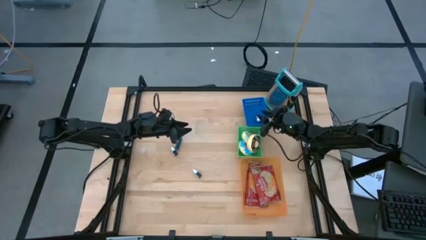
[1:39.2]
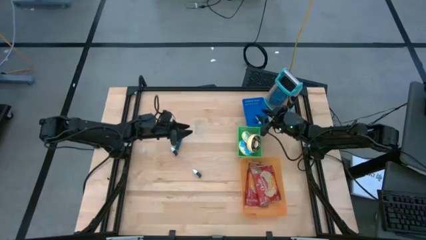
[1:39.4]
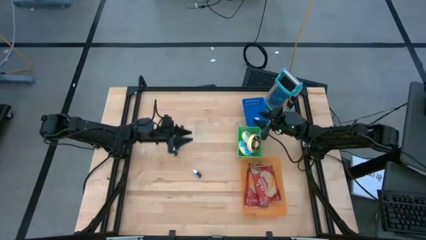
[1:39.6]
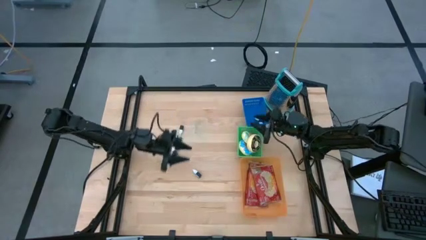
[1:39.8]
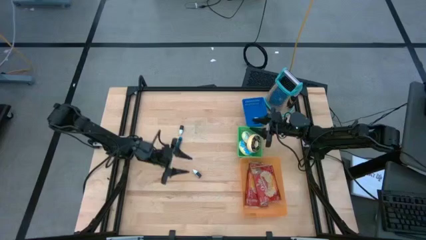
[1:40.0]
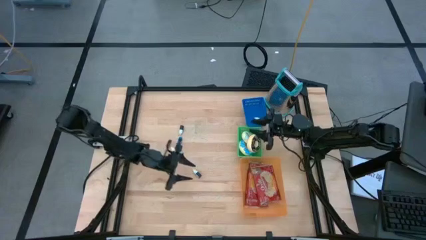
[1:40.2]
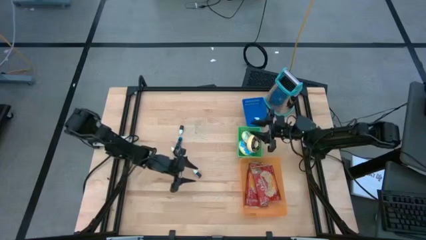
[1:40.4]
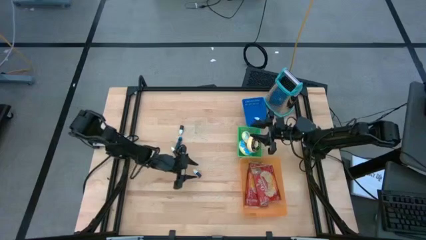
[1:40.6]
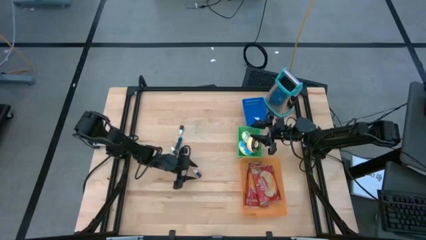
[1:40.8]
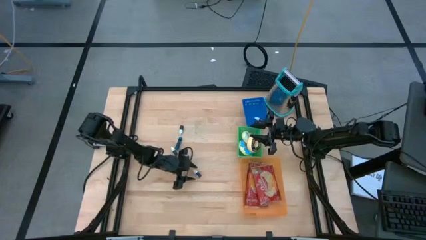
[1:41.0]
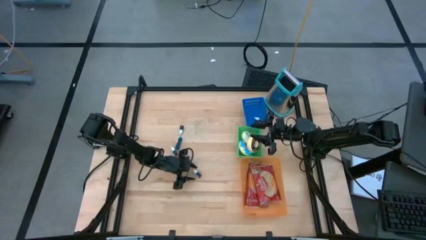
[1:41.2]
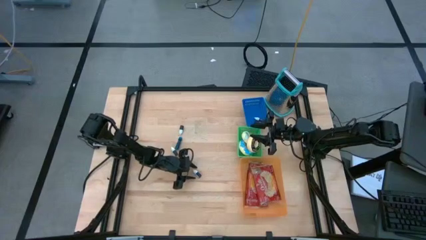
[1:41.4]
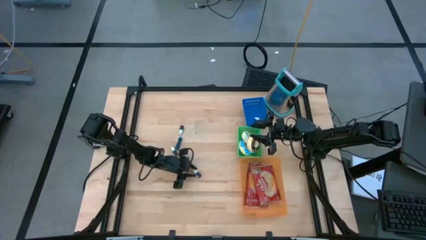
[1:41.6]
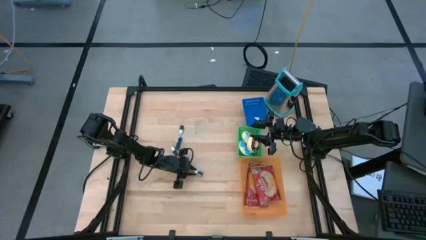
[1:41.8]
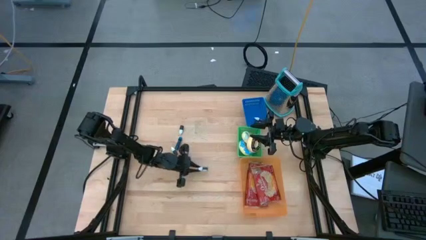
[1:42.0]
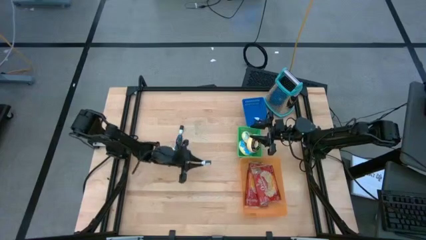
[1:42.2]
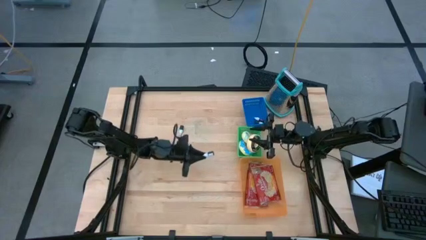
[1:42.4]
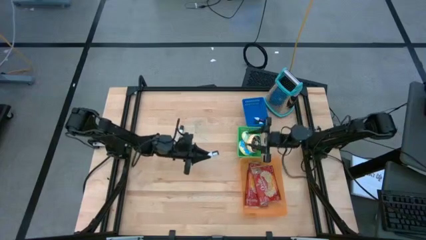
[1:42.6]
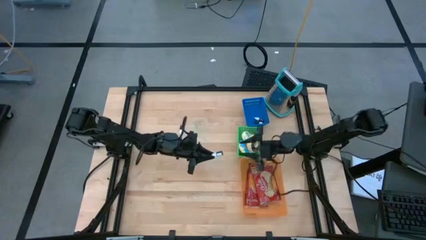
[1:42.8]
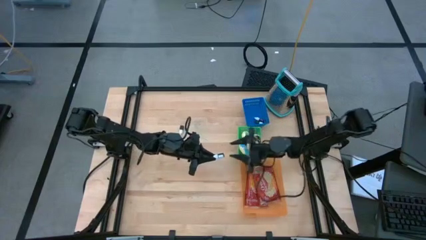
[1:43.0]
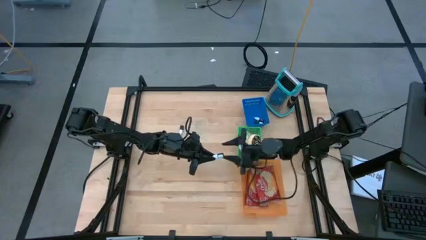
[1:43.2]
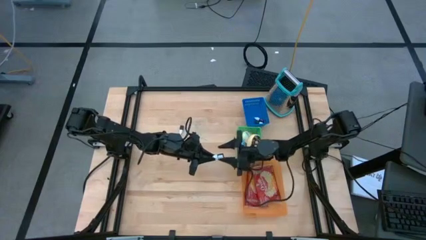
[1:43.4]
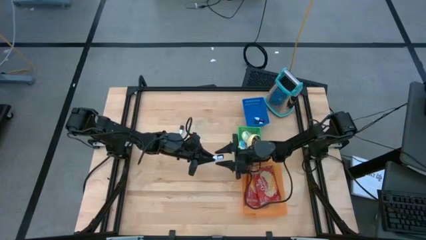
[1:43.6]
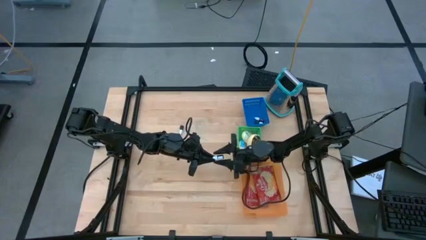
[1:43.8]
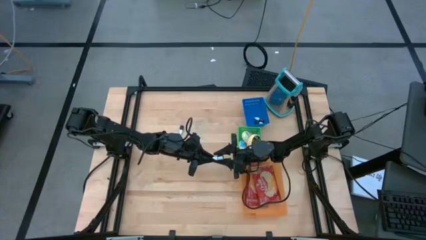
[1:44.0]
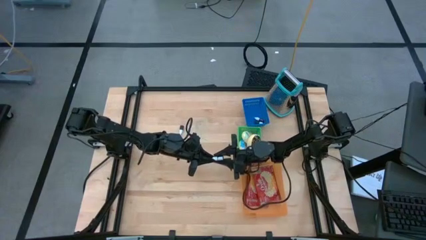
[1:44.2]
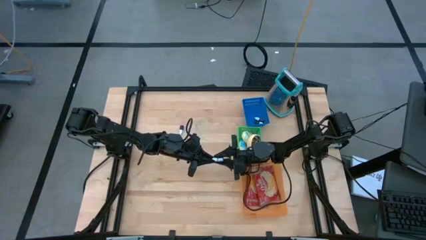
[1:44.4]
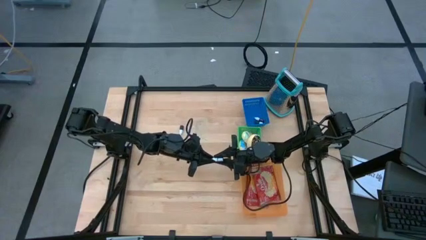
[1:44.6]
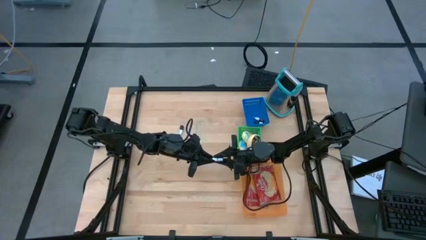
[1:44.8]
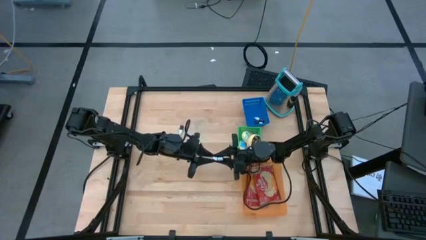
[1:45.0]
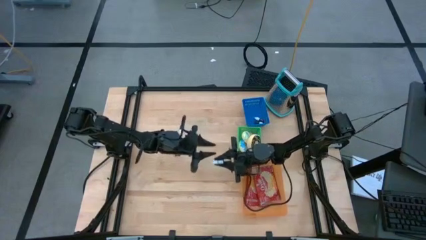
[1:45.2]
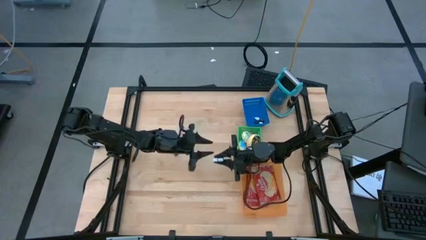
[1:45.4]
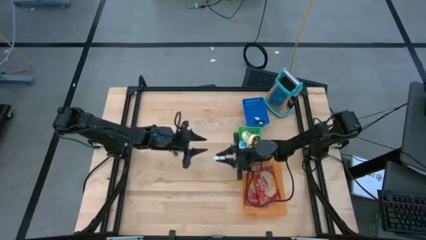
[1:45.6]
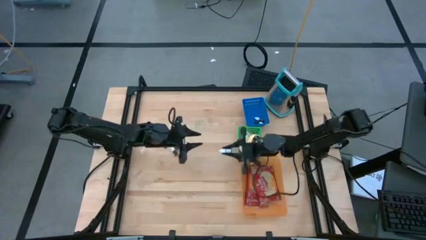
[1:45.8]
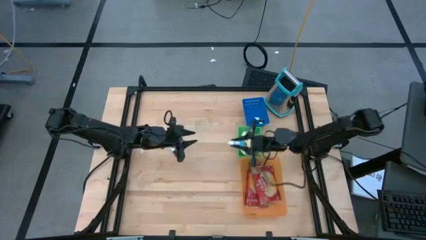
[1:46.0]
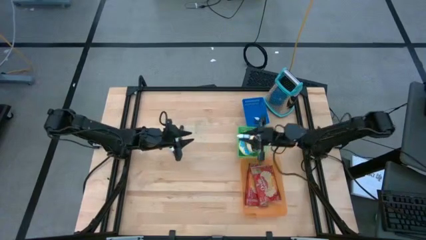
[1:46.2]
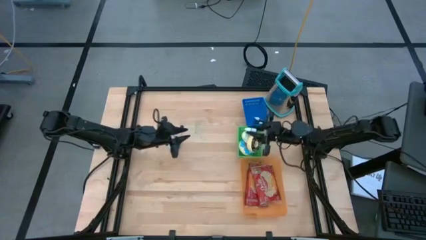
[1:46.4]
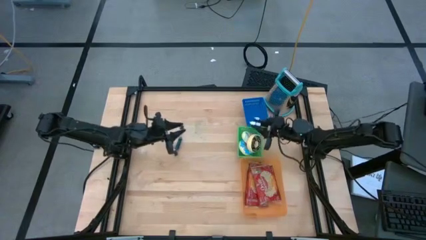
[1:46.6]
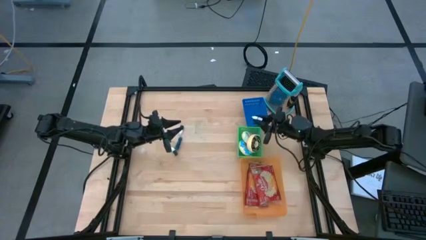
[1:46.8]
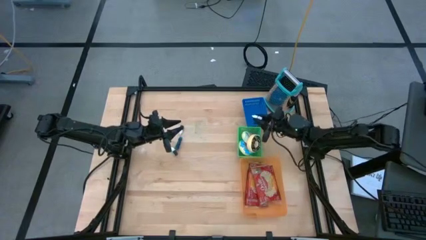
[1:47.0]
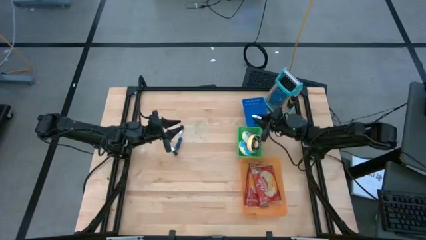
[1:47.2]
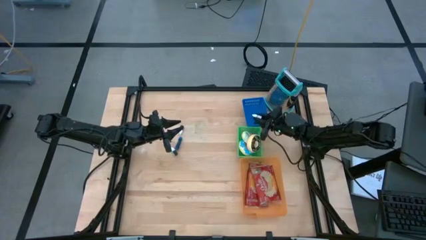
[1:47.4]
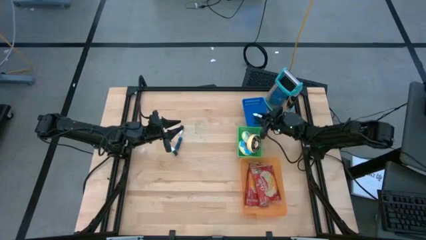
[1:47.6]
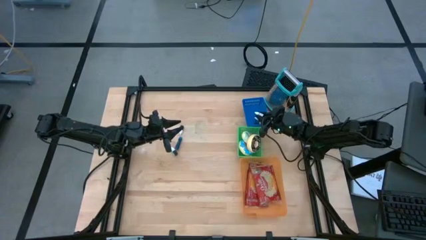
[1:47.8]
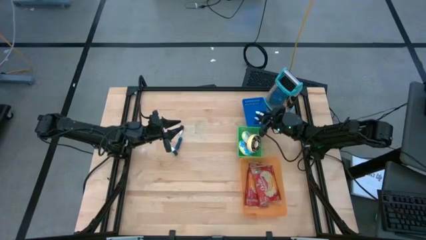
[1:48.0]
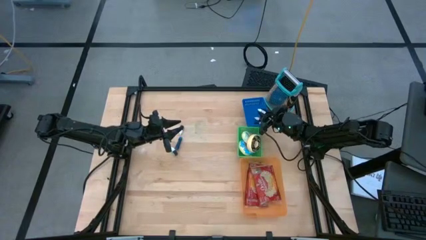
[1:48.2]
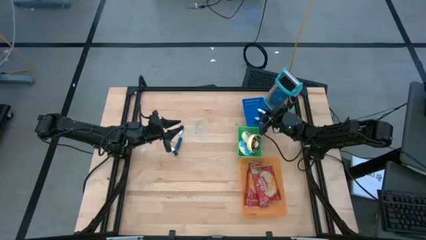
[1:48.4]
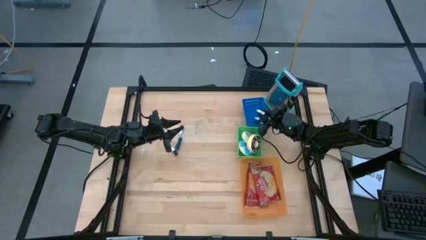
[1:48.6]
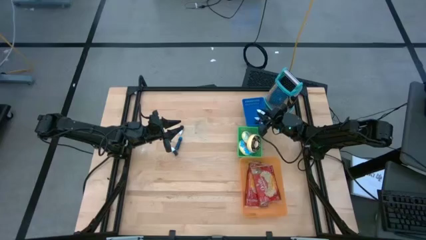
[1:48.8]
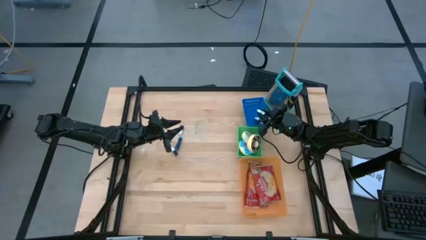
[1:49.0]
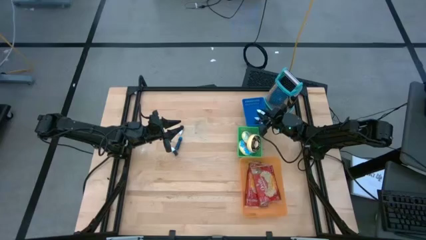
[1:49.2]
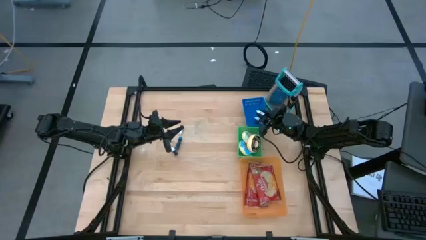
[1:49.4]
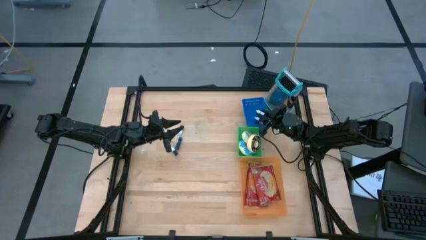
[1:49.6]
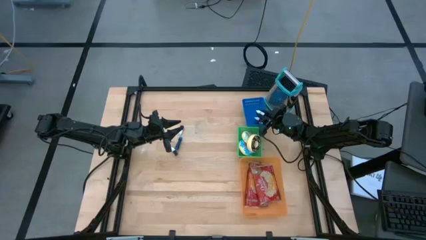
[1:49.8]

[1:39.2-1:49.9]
Put the dark blue food coloring bottle into the blue bin

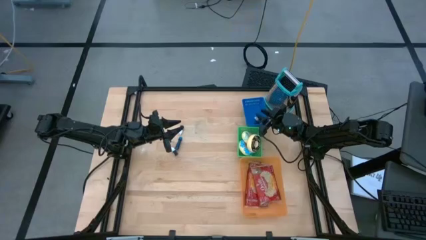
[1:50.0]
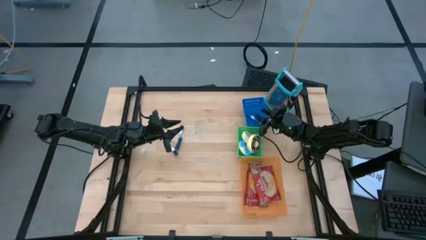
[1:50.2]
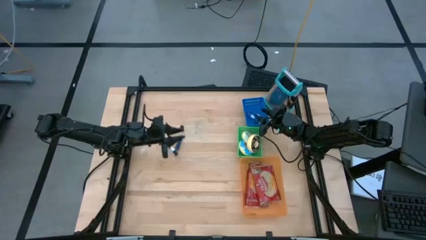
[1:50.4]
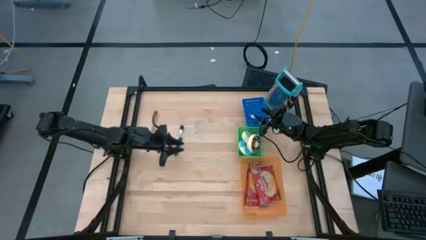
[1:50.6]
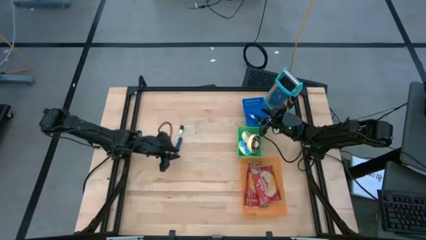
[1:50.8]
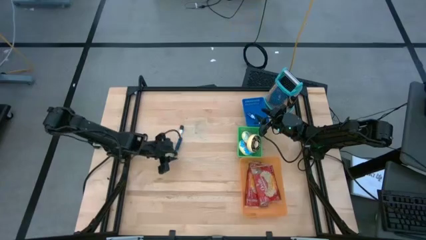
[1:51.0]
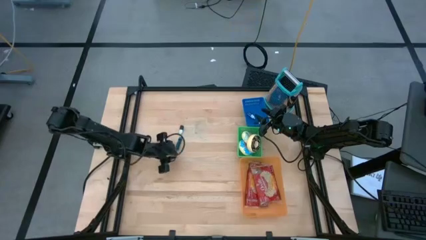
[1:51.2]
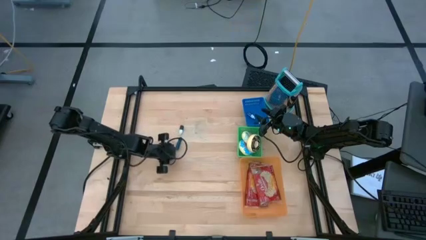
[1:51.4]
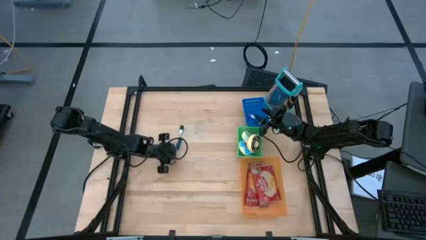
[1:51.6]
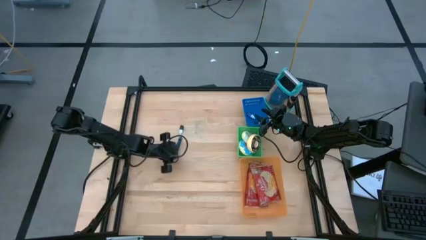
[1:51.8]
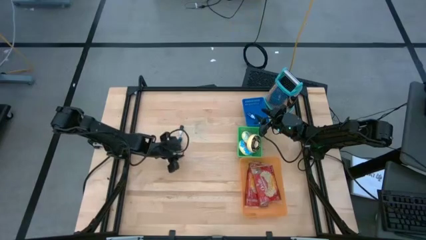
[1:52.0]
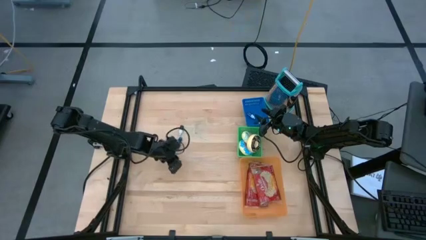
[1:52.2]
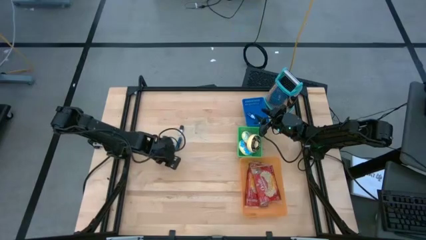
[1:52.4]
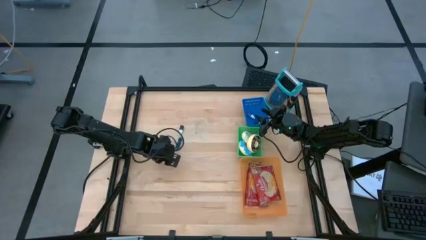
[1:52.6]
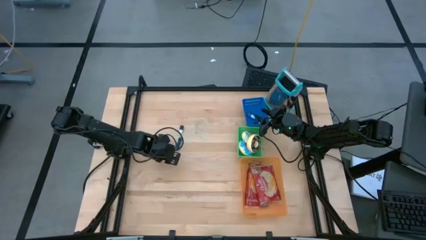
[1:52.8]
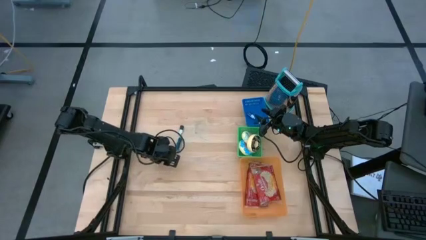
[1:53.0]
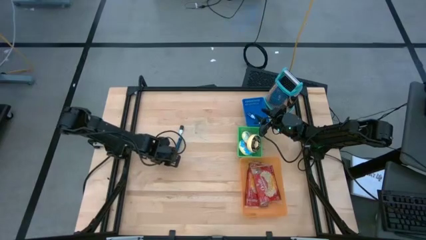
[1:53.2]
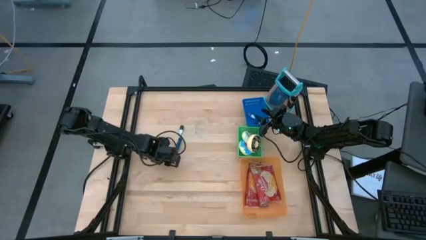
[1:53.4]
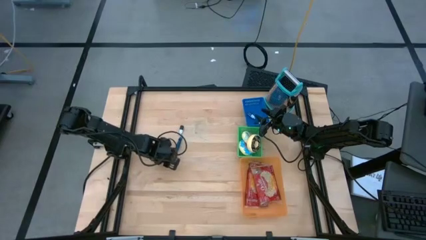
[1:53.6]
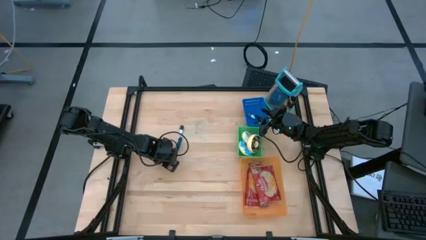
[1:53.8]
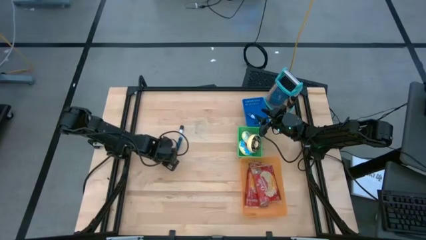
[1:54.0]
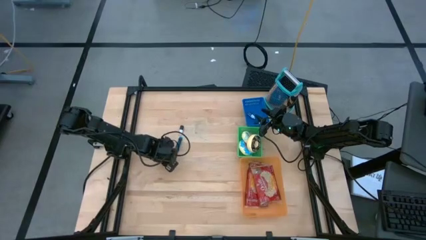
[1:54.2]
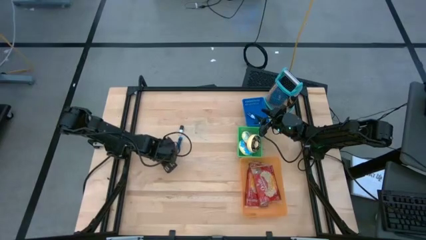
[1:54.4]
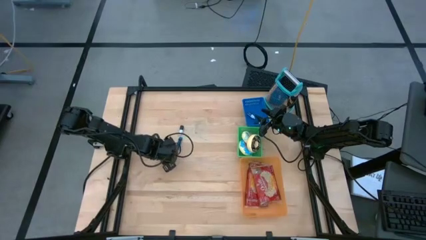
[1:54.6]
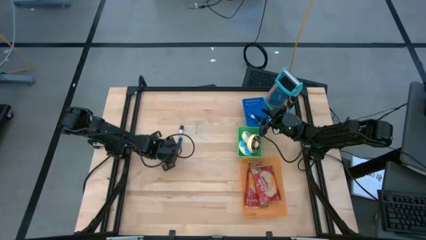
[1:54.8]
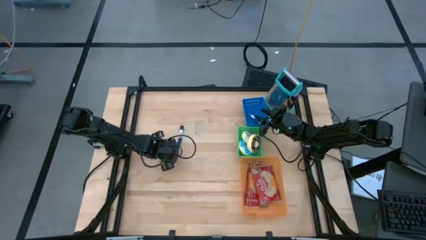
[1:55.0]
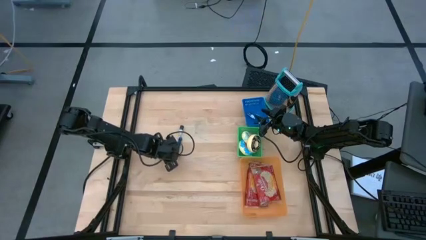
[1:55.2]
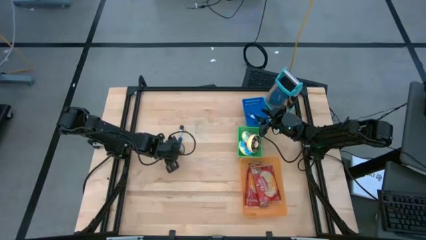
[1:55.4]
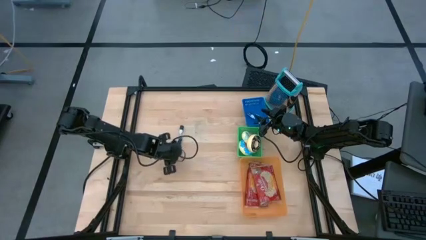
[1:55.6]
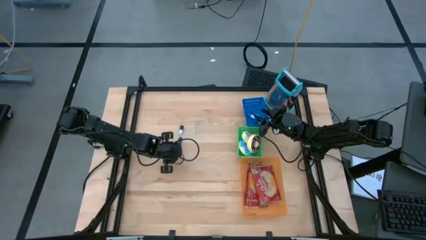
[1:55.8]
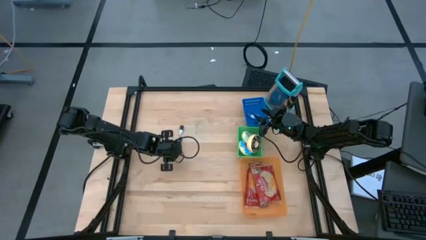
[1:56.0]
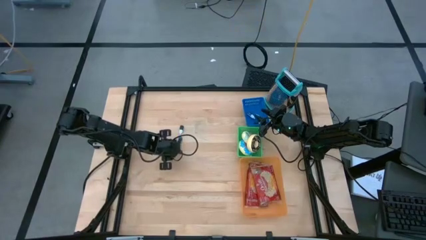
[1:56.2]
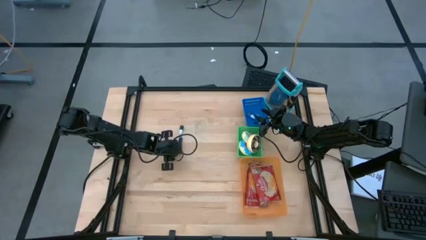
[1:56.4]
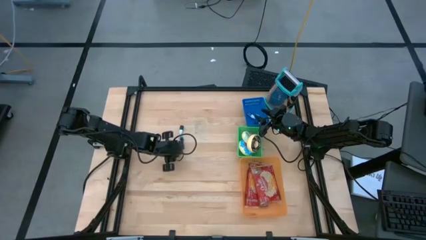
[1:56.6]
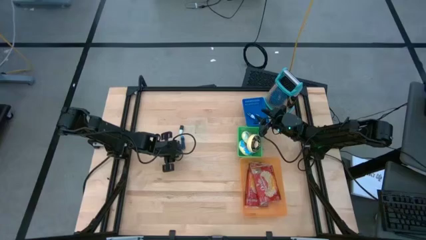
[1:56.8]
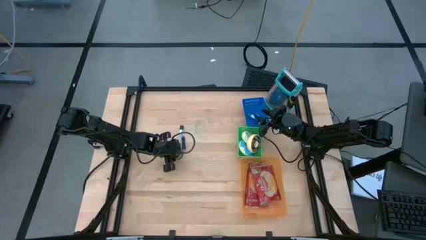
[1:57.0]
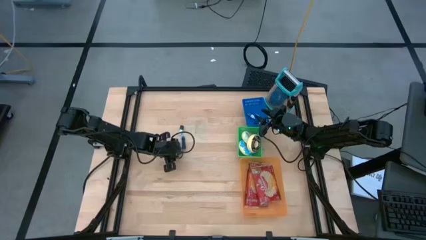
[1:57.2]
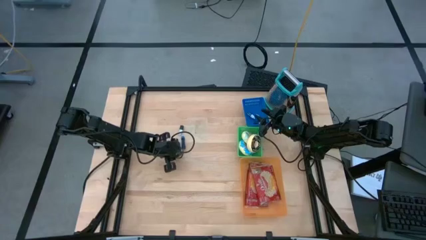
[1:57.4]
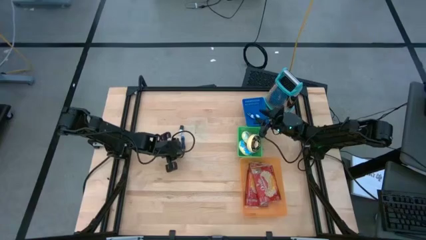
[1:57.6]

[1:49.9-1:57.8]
Put the brown food coloring bottle into the blue bin
